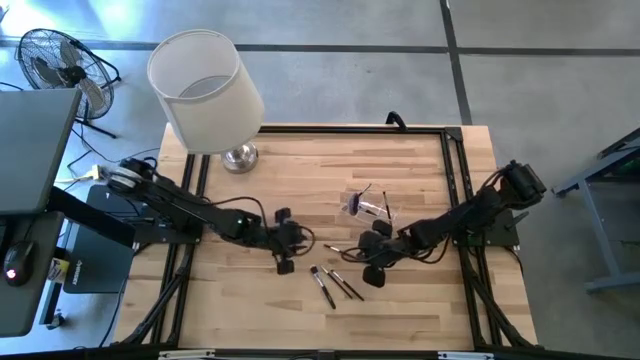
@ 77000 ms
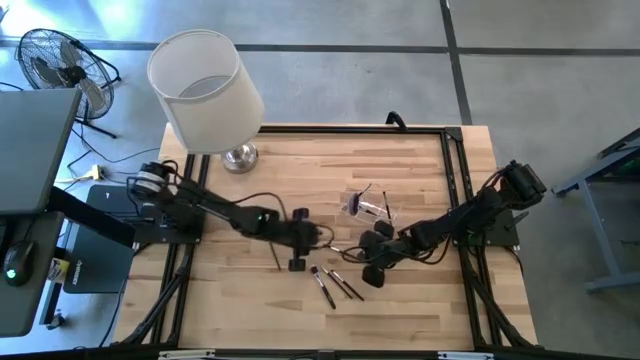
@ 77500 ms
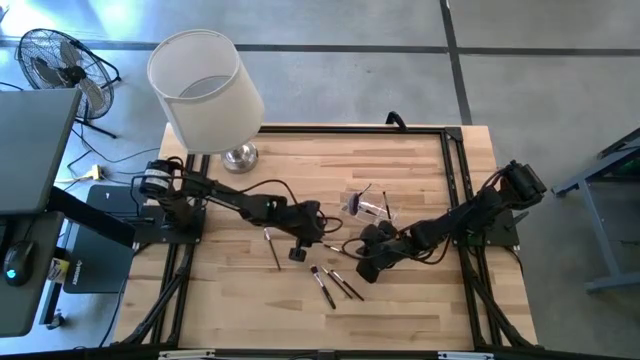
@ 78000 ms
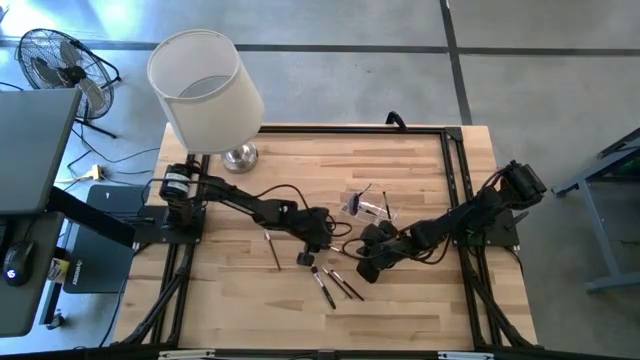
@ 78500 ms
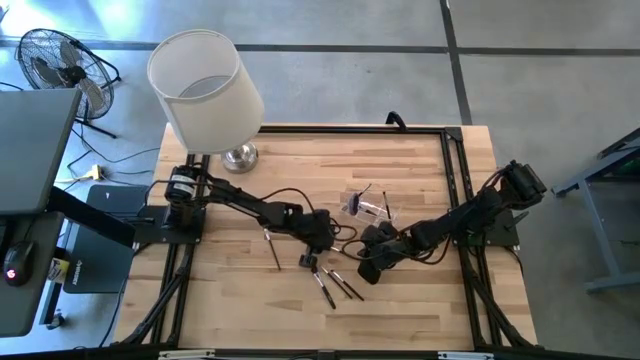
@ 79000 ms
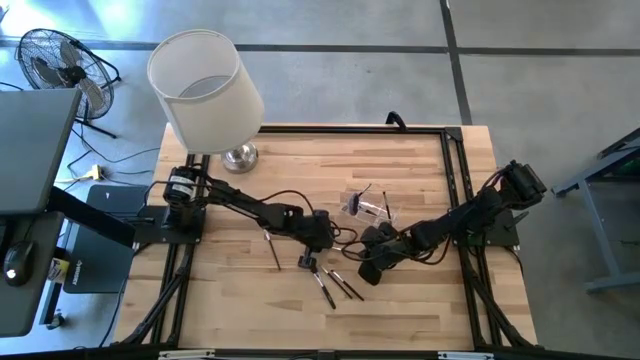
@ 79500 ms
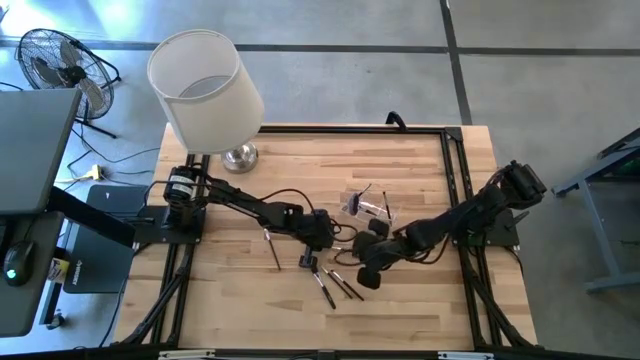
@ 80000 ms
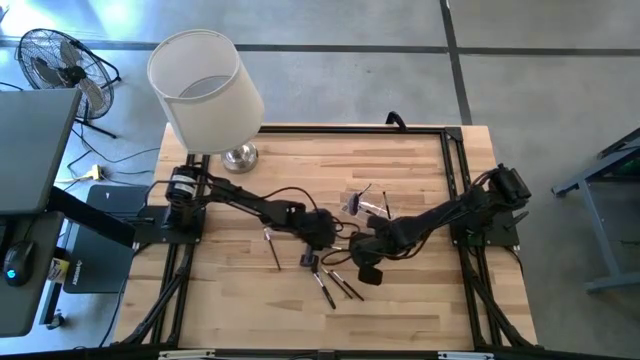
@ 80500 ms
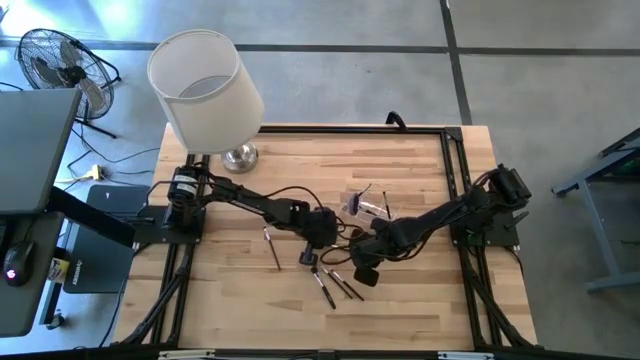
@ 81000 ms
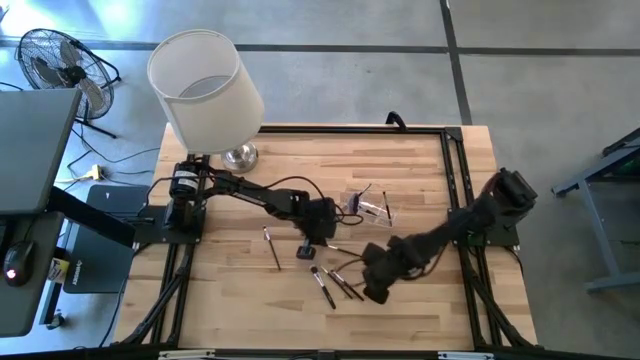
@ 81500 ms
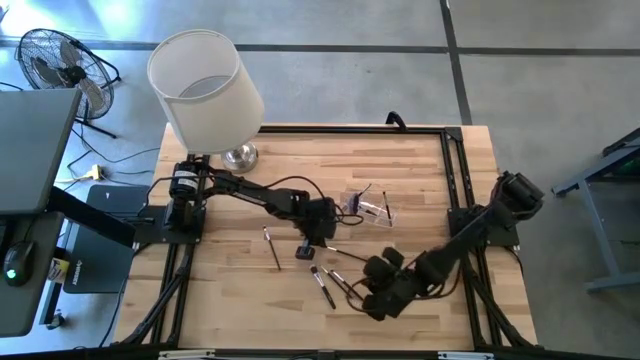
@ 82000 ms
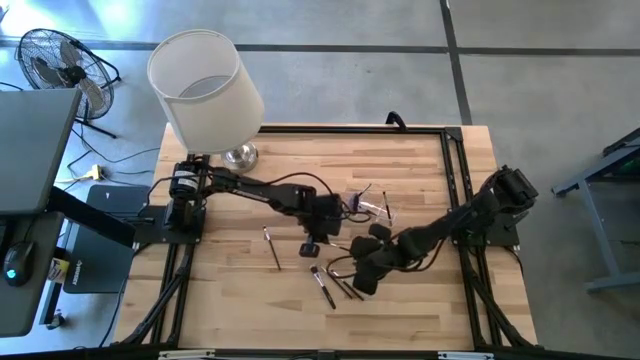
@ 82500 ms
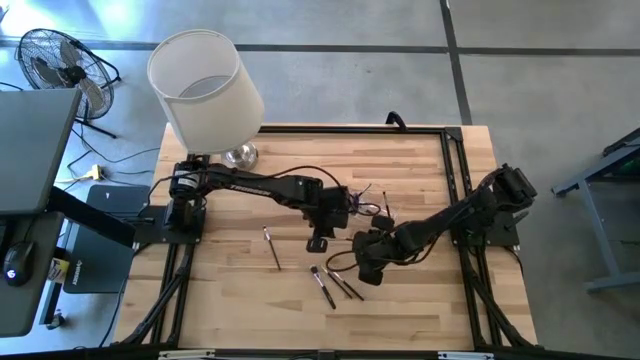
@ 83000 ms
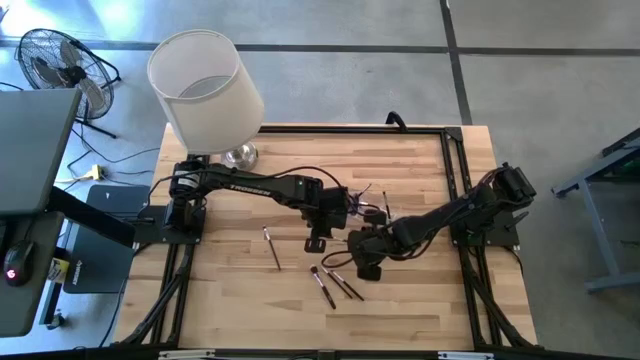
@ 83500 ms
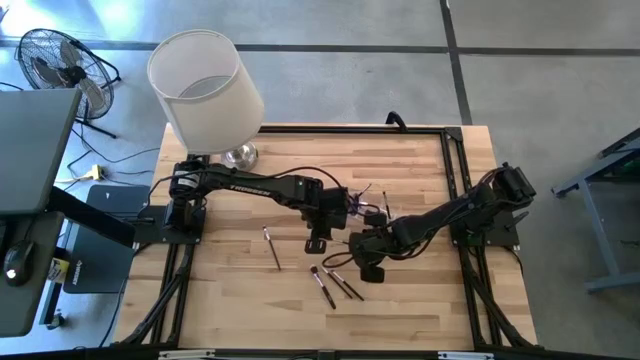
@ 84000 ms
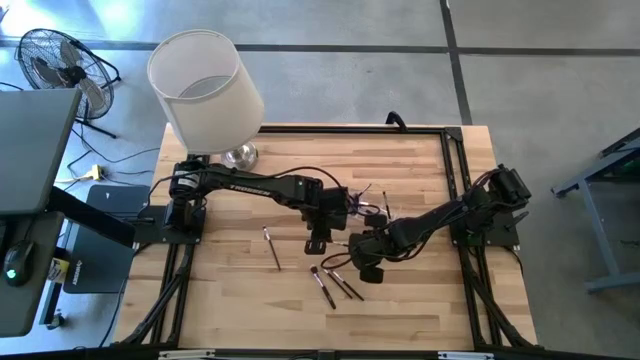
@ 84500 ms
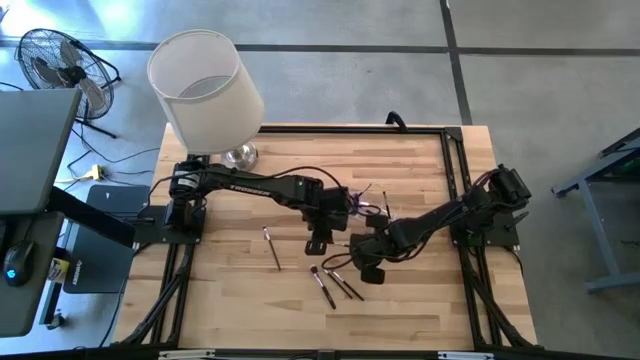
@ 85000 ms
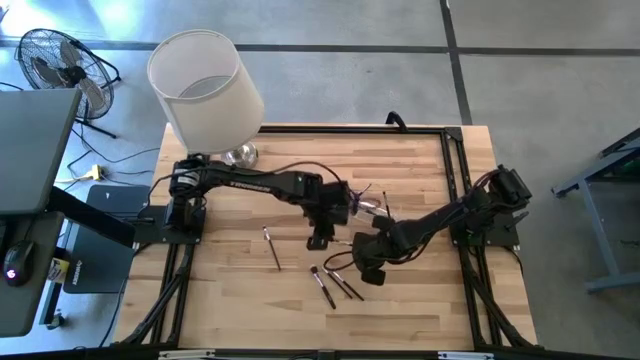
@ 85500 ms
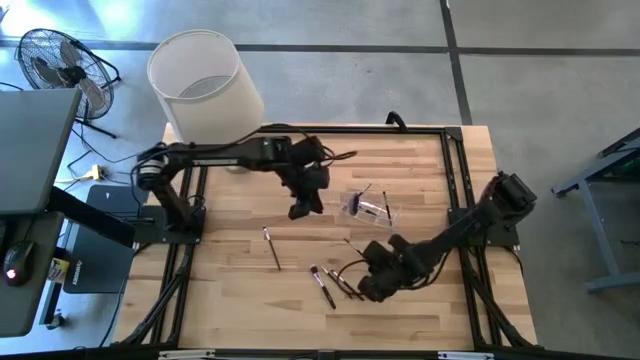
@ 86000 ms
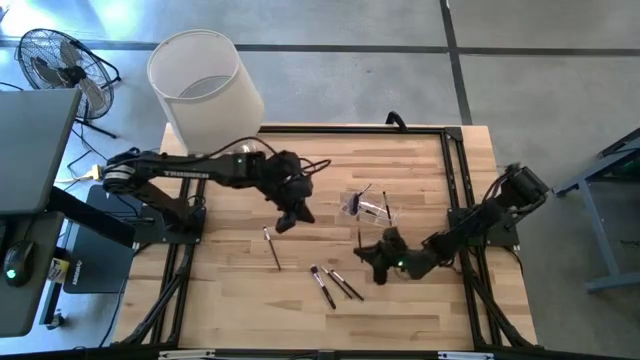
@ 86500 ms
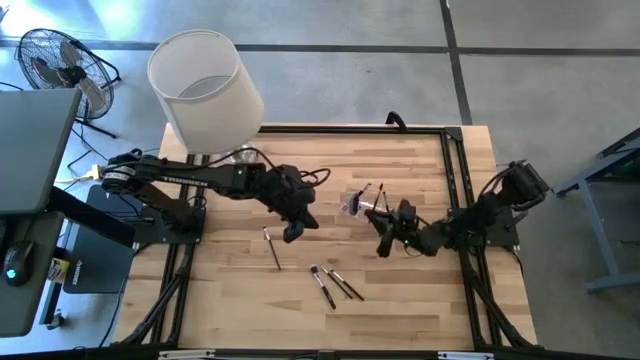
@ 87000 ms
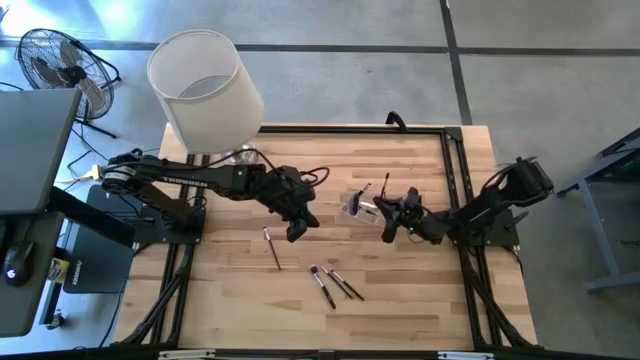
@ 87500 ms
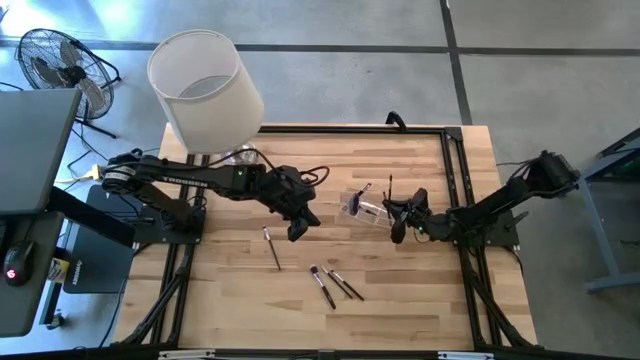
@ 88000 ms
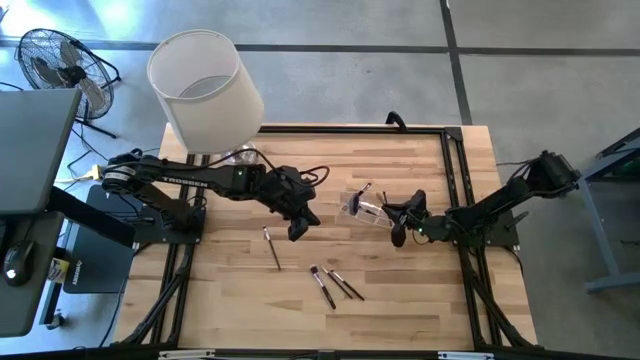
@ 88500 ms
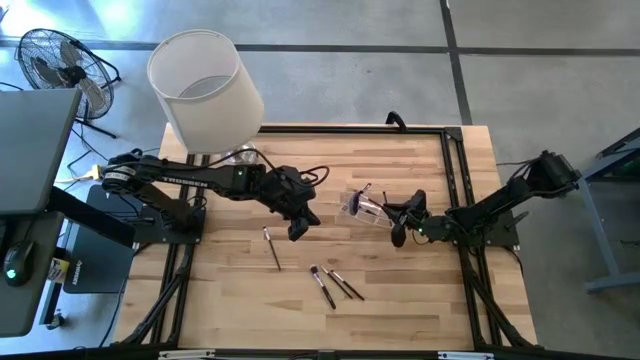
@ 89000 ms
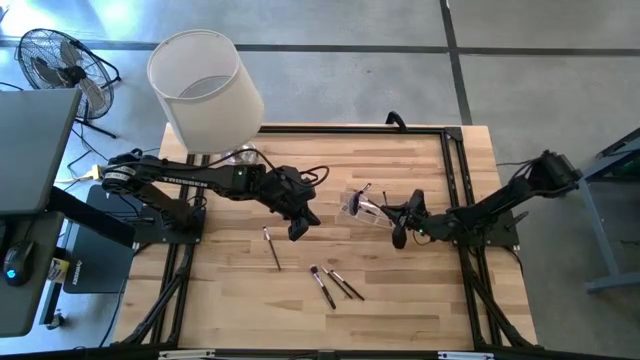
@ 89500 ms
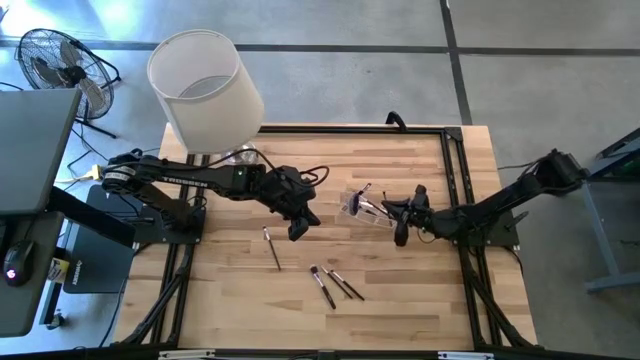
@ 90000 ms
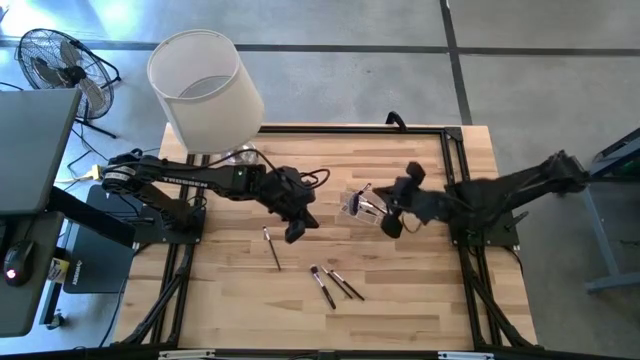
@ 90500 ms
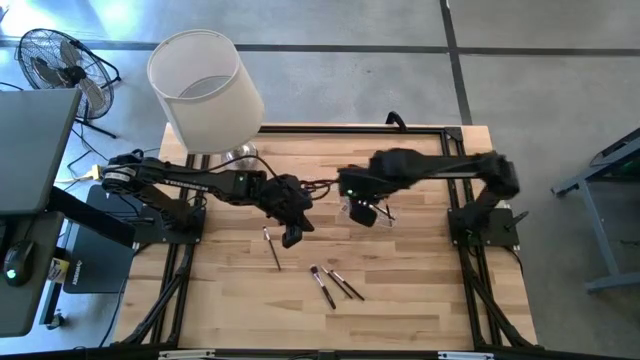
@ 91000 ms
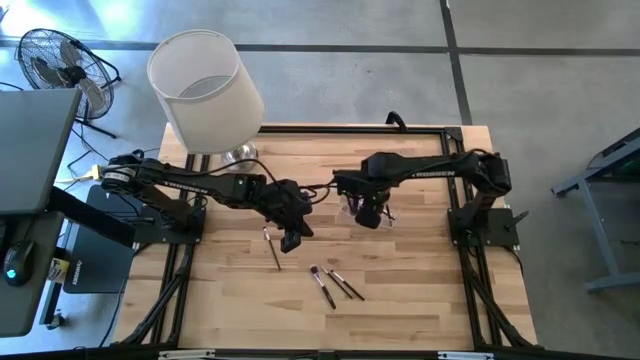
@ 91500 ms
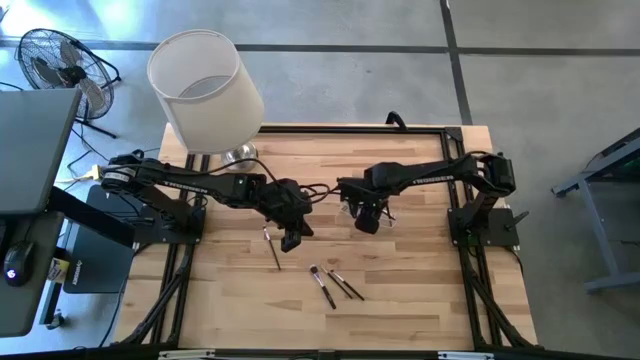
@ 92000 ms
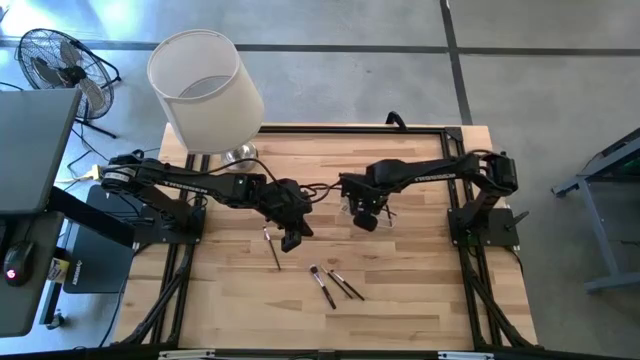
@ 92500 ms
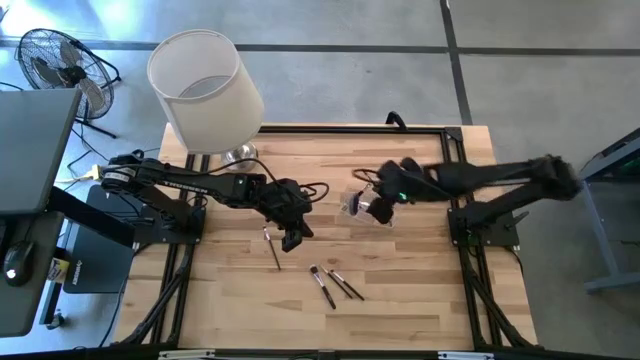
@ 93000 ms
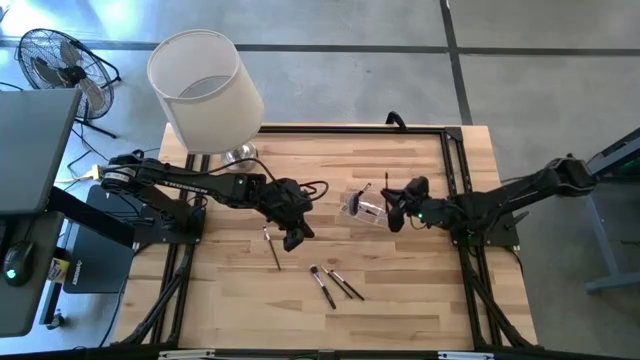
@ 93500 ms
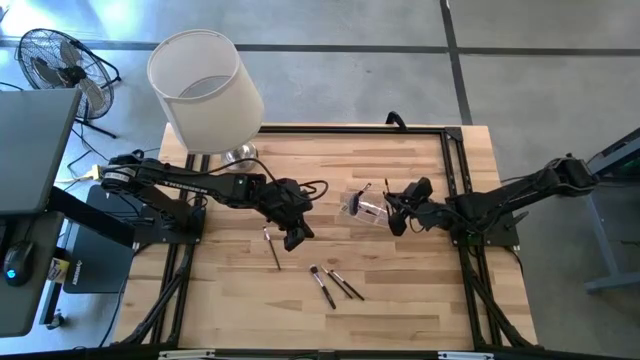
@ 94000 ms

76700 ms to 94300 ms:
Task: Put items in baskets/containers
Put the black lash brush into the transparent organizer
